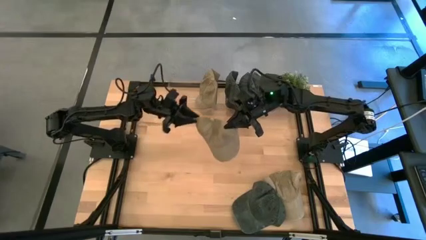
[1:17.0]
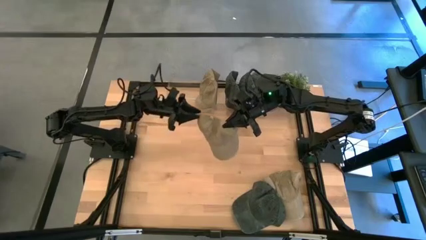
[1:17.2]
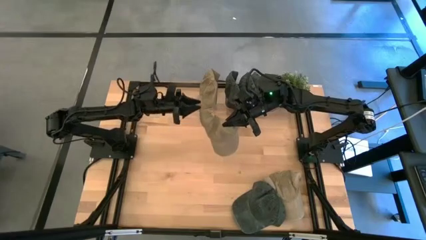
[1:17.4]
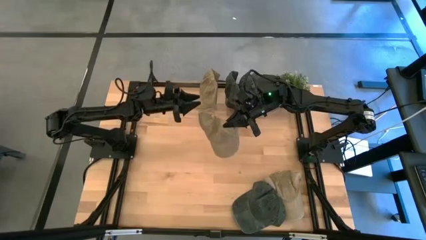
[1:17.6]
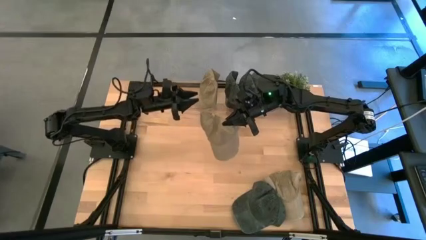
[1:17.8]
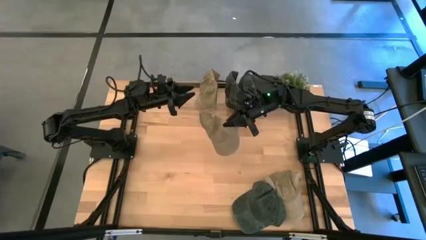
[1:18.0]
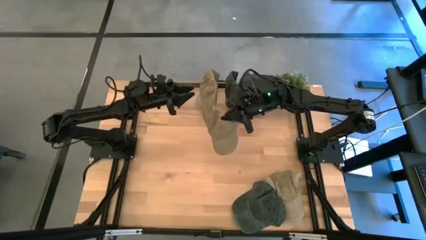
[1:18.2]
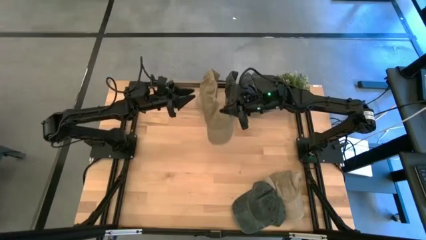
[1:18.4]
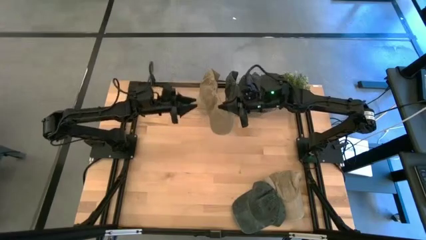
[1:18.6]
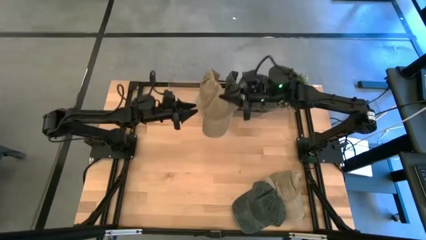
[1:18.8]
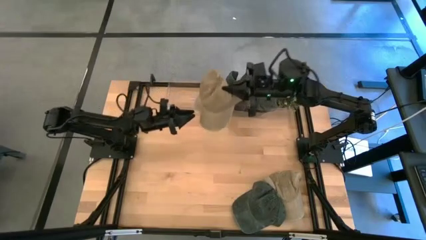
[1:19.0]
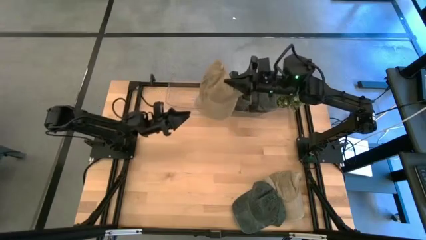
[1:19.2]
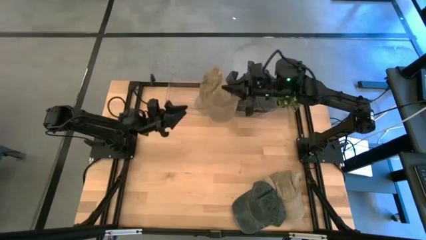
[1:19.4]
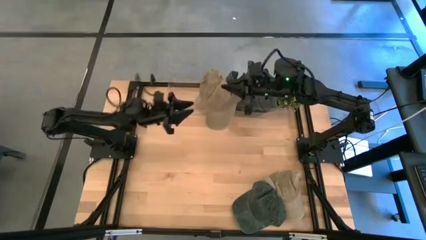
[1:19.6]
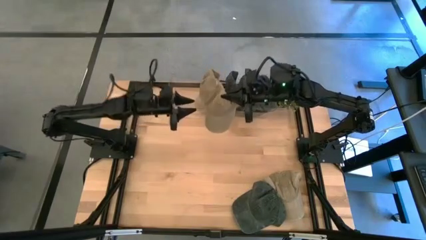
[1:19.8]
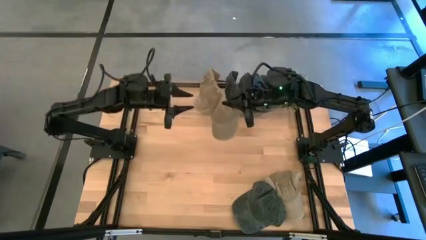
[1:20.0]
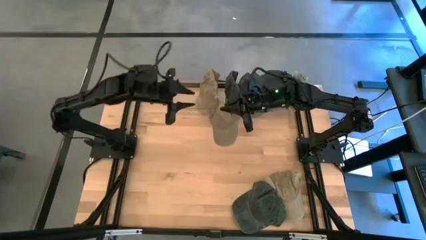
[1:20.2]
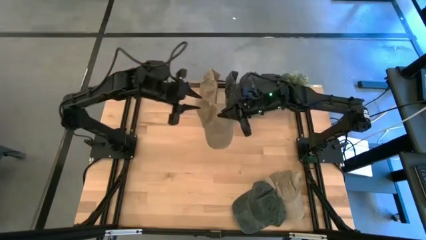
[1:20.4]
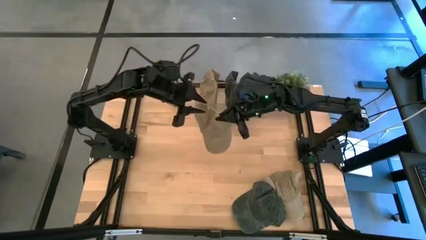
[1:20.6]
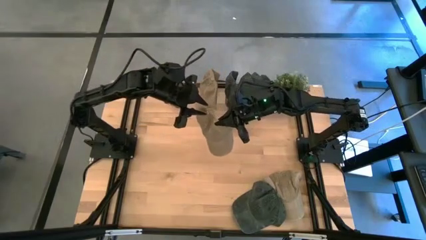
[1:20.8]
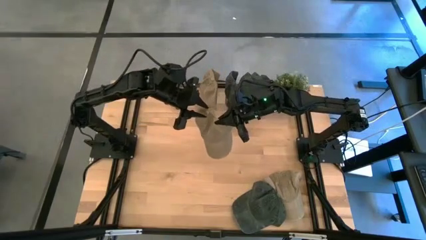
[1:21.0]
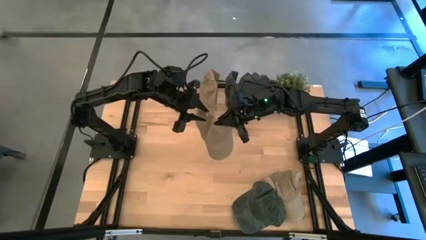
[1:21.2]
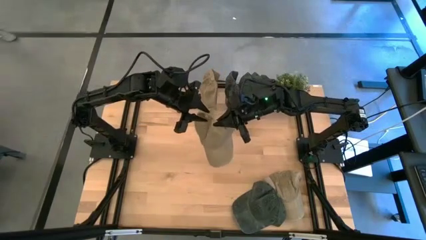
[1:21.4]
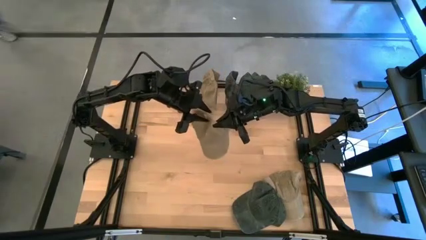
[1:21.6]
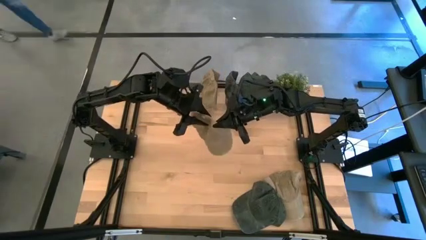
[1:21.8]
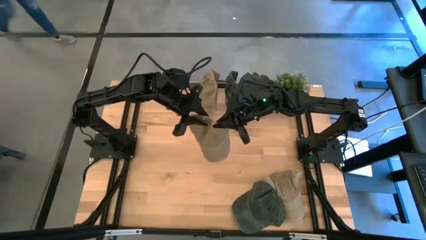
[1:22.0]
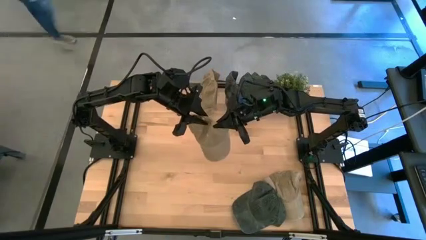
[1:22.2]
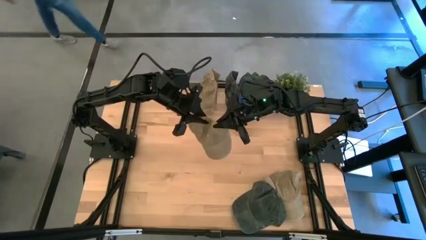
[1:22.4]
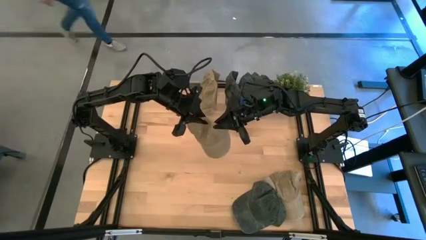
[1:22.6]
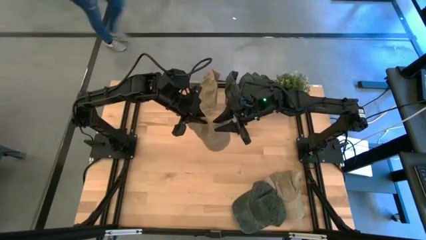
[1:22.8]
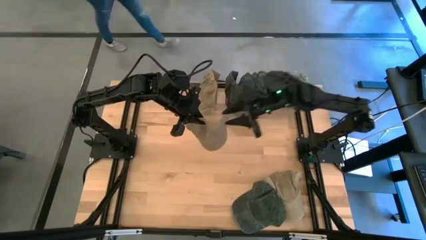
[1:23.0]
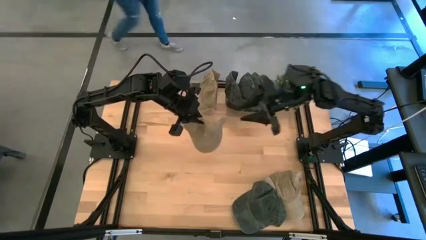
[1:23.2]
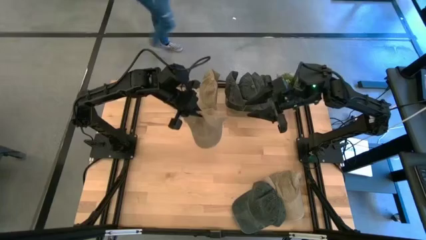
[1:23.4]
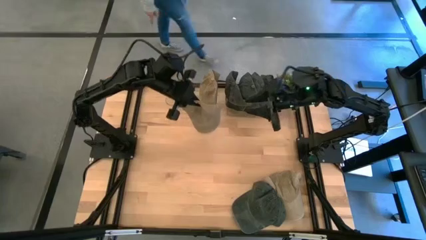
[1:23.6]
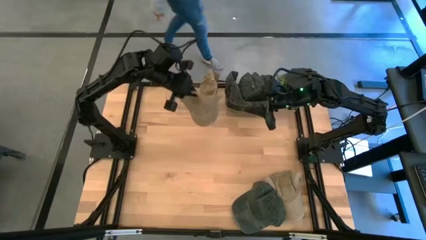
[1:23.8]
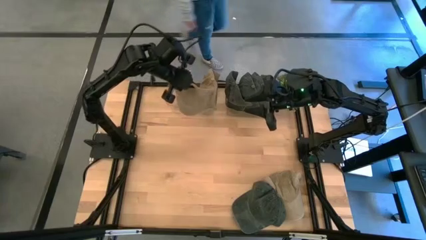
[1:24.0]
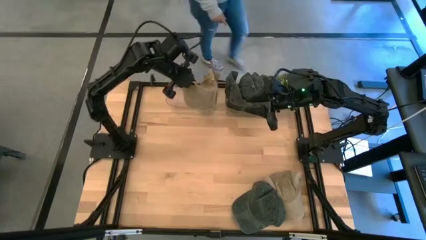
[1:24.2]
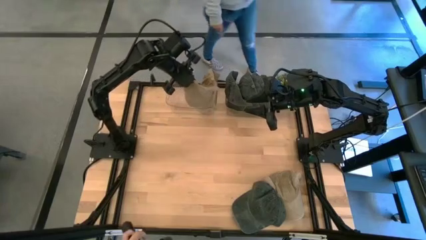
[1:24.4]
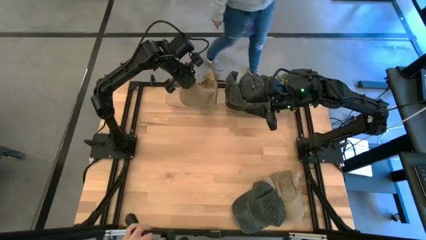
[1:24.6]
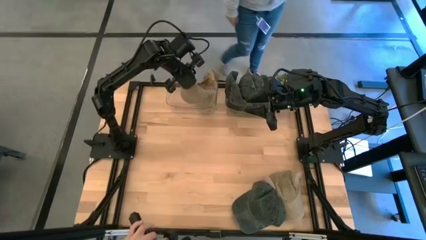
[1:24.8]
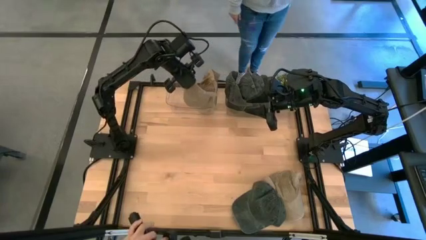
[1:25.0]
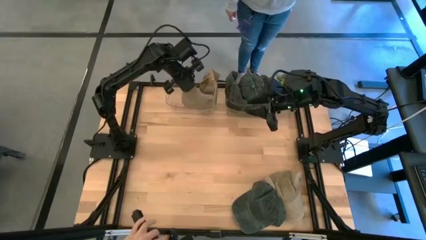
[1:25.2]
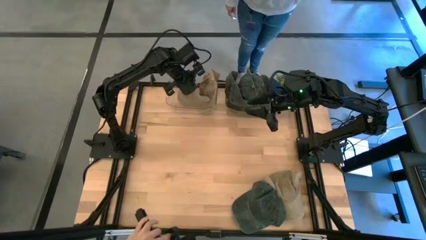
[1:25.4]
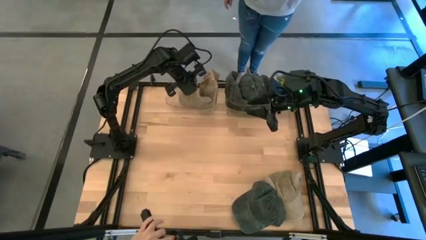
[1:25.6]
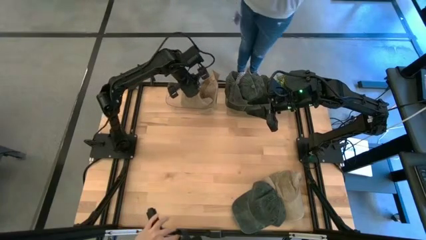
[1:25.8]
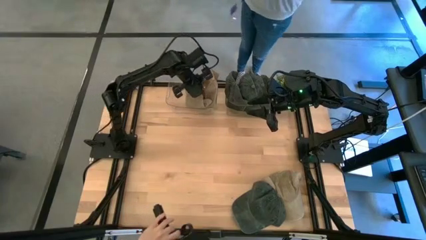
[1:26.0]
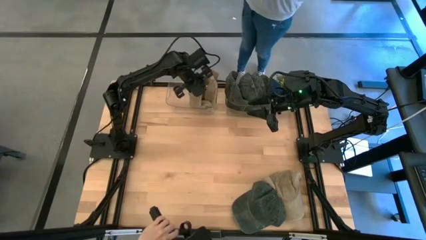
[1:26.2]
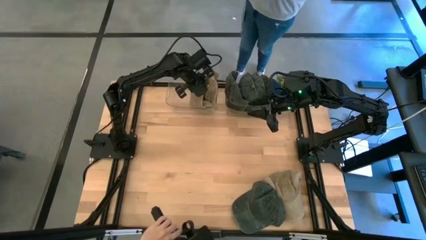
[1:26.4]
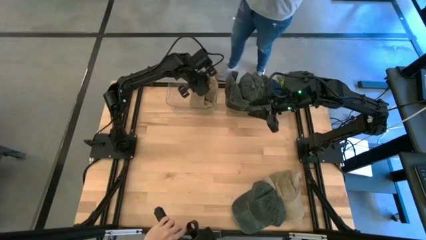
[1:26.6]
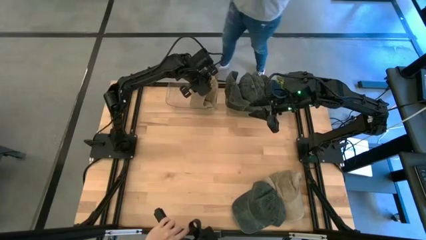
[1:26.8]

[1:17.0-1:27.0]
Task: Pick & Place hat
Put the brown cap into the left transparent bin

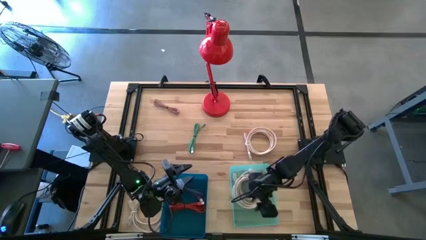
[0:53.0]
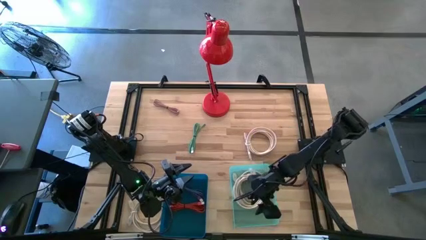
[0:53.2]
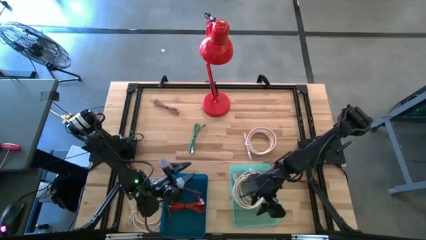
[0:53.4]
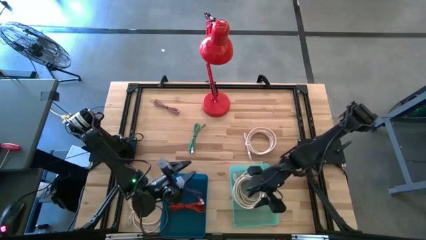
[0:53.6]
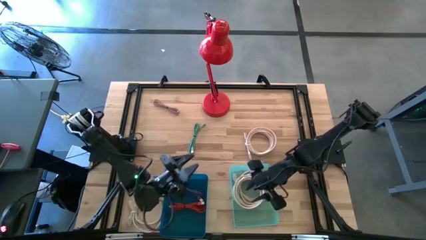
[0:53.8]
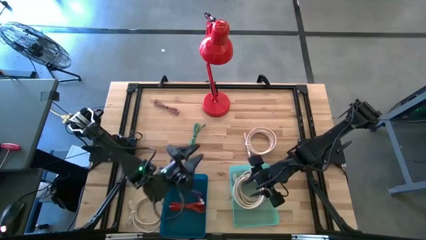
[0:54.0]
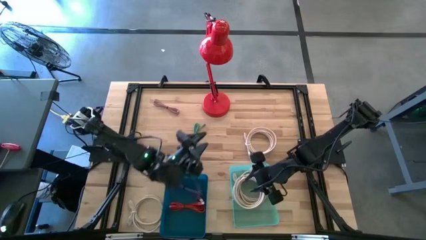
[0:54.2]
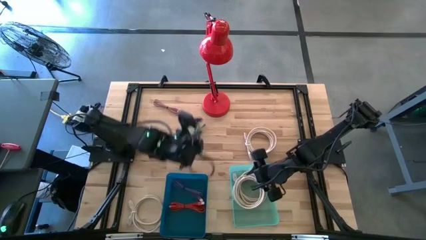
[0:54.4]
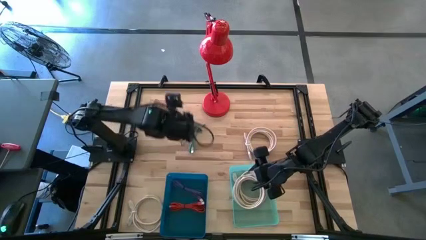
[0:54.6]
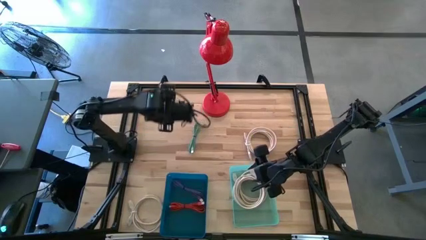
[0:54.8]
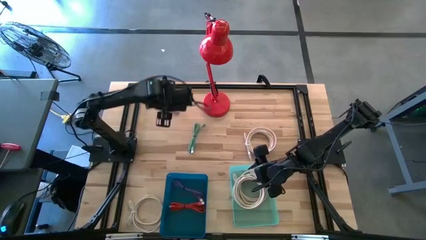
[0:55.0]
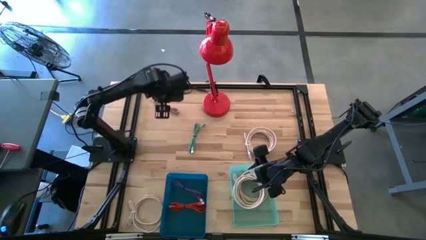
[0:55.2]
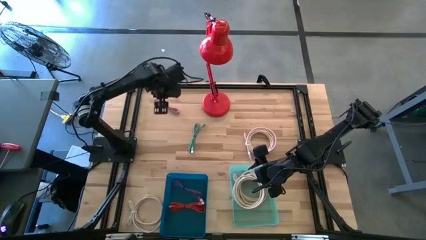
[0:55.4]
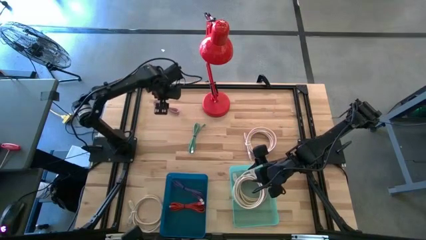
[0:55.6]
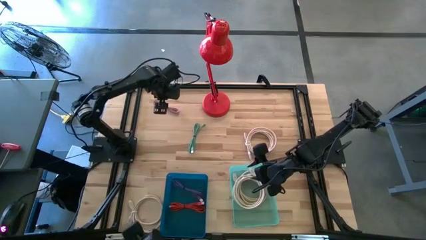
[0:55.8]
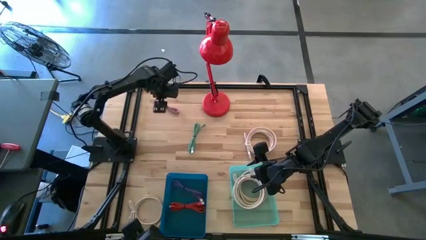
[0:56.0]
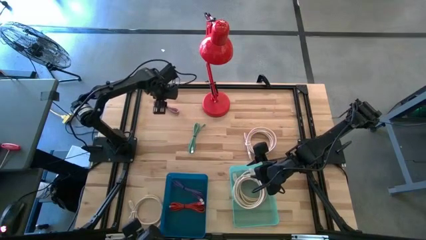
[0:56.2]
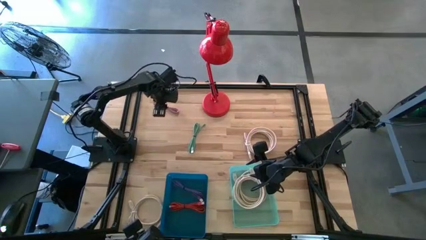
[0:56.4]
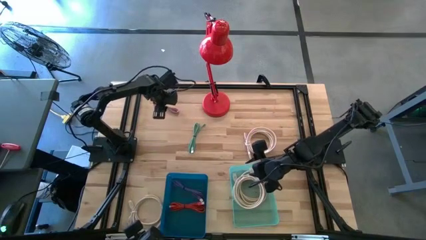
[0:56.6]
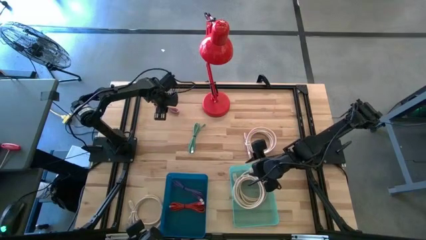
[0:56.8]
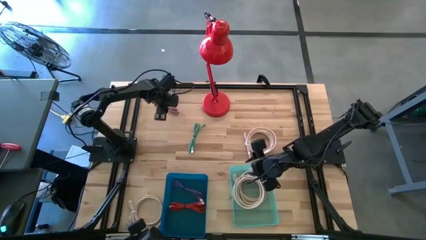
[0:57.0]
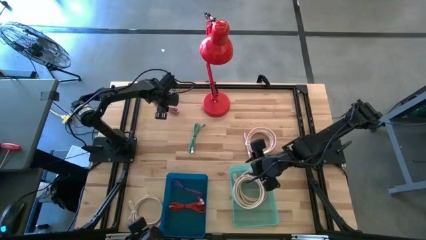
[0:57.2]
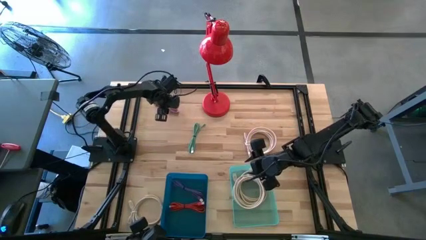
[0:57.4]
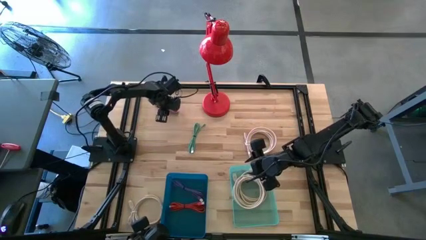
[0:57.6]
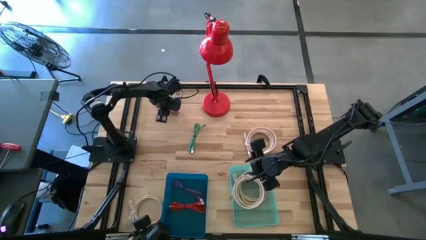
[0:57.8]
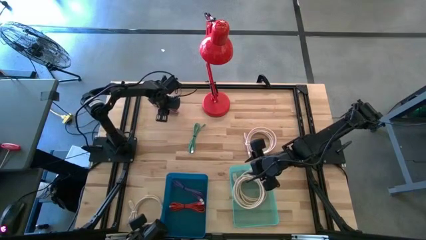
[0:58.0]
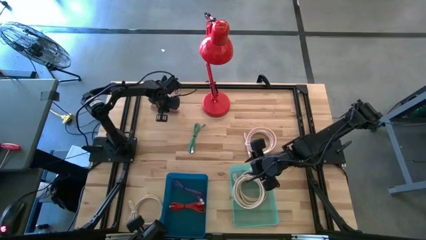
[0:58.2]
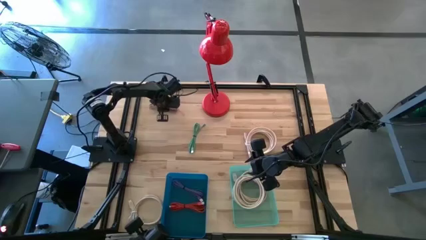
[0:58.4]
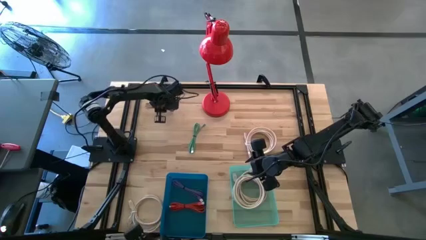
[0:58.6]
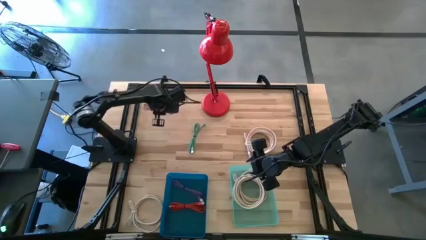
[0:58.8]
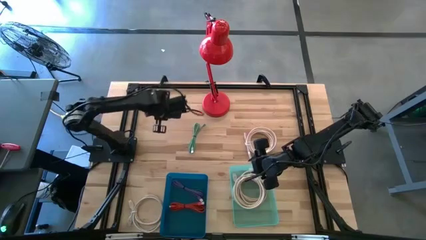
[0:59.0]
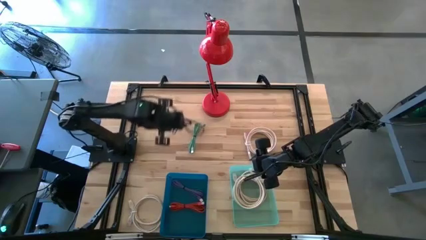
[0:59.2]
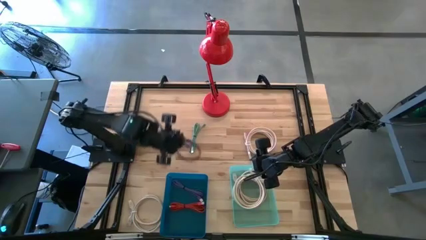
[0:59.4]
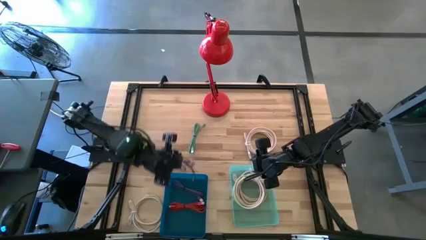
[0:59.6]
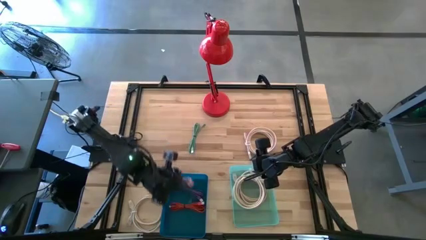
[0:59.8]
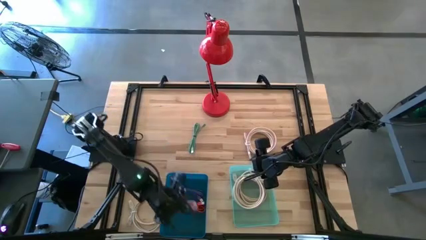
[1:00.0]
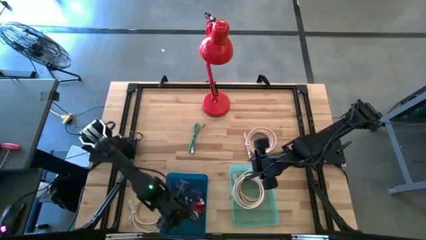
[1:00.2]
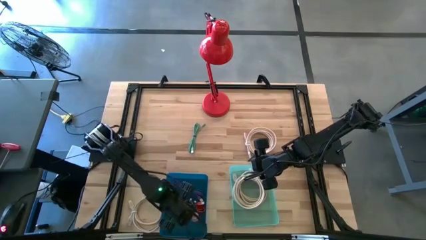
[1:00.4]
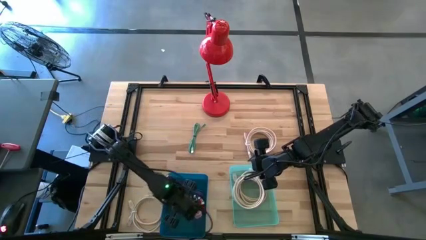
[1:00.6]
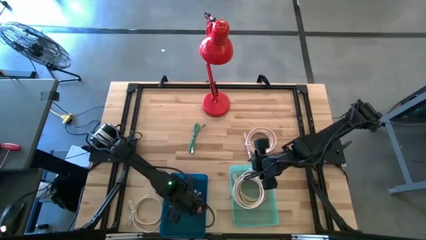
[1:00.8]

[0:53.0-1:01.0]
Task: Pick & Place USB Port
Put the pink charger cable into the blue bin
